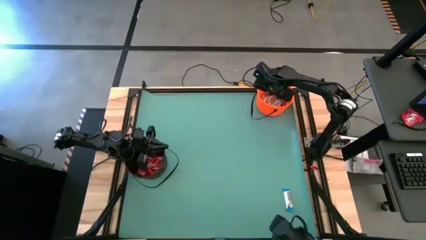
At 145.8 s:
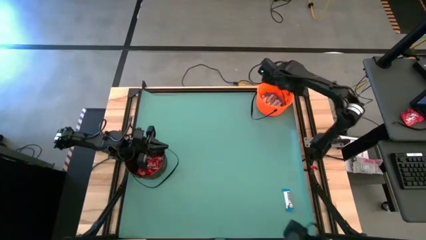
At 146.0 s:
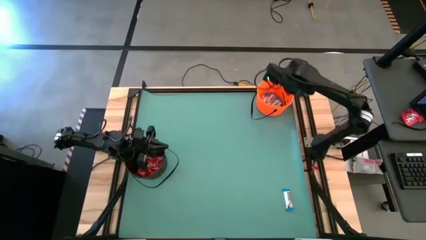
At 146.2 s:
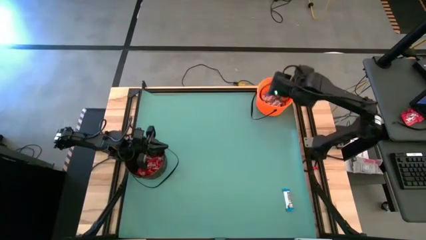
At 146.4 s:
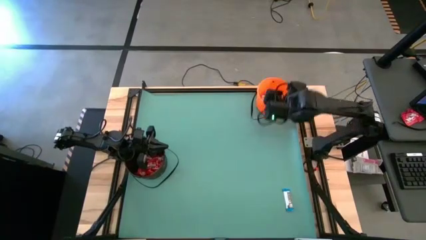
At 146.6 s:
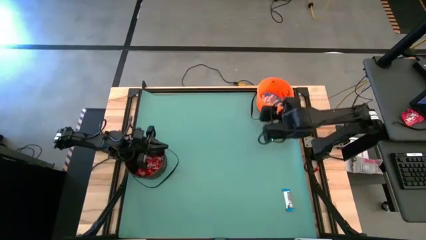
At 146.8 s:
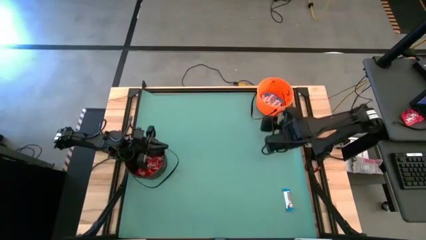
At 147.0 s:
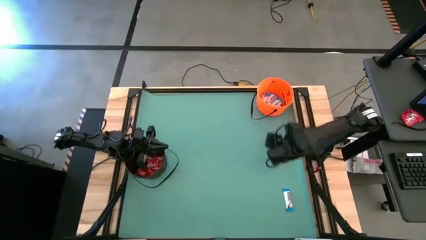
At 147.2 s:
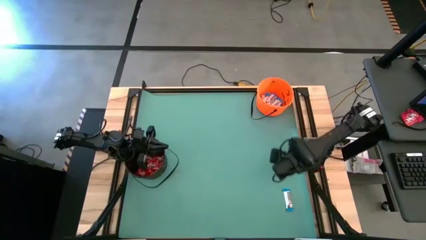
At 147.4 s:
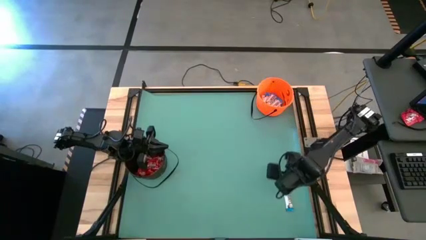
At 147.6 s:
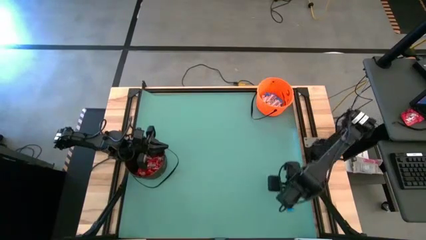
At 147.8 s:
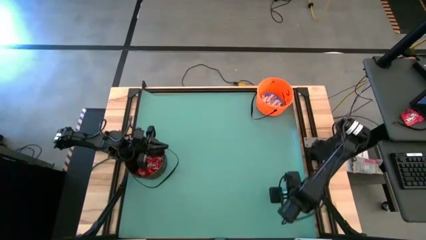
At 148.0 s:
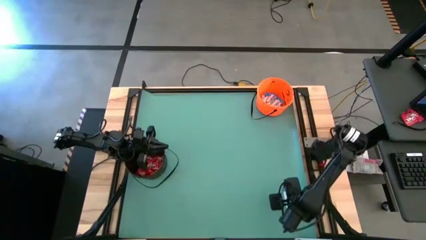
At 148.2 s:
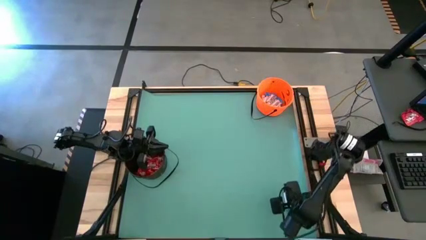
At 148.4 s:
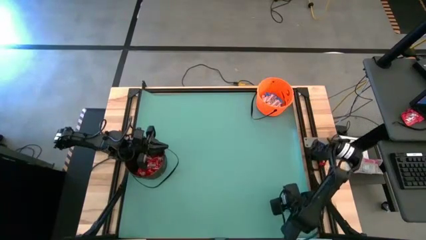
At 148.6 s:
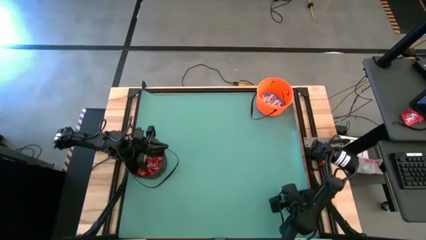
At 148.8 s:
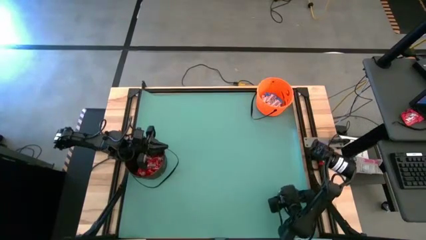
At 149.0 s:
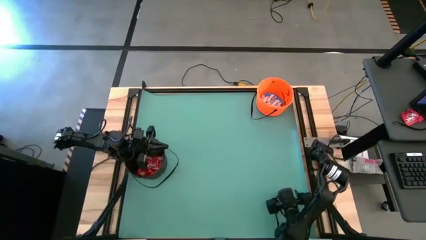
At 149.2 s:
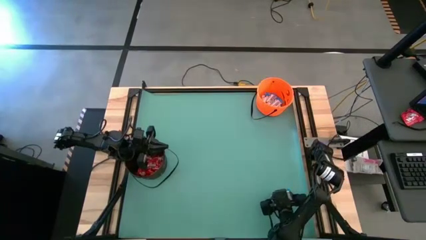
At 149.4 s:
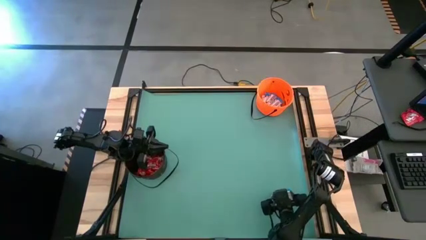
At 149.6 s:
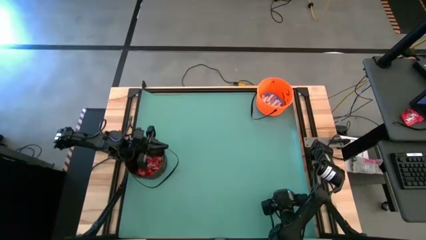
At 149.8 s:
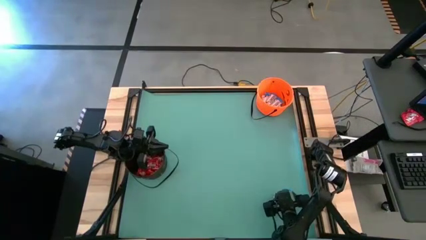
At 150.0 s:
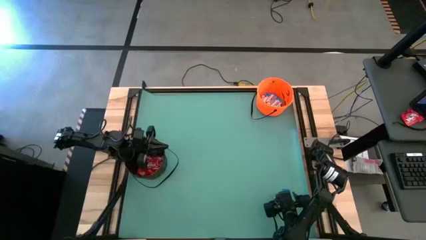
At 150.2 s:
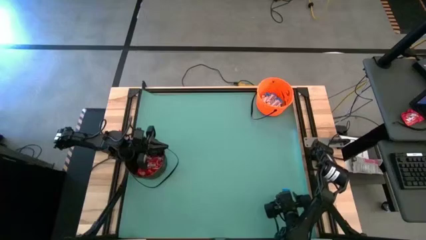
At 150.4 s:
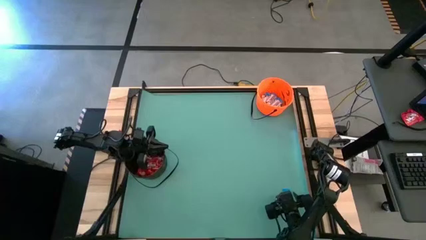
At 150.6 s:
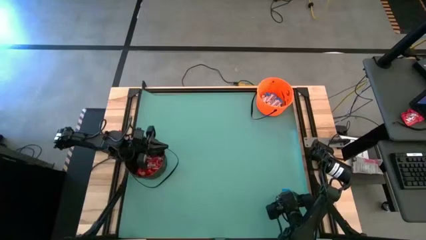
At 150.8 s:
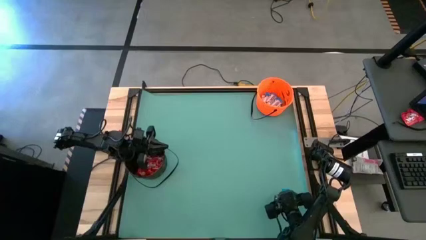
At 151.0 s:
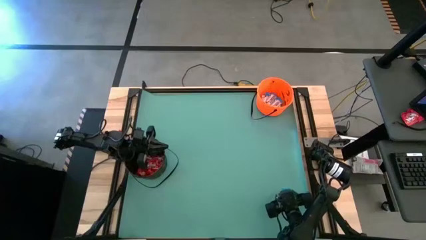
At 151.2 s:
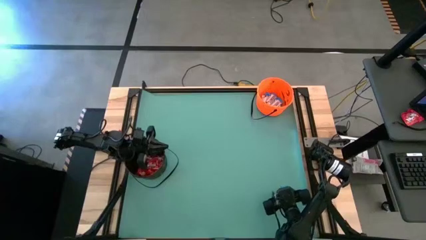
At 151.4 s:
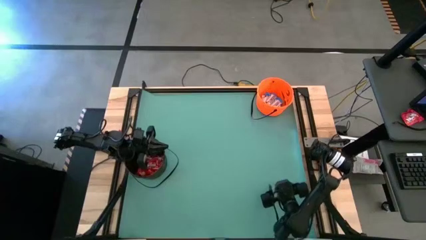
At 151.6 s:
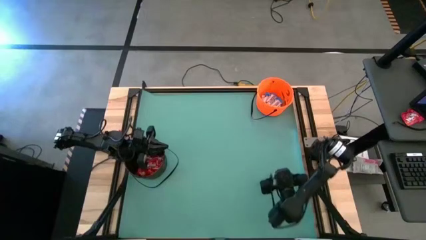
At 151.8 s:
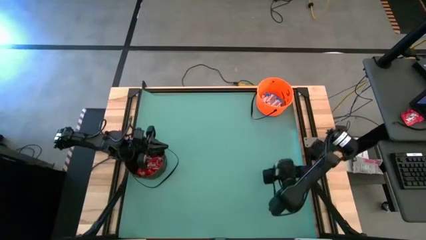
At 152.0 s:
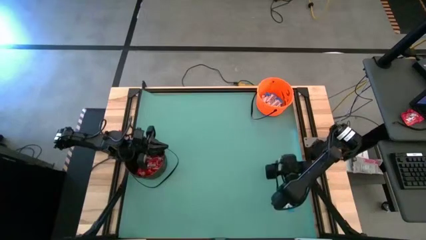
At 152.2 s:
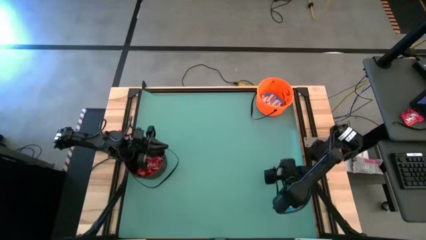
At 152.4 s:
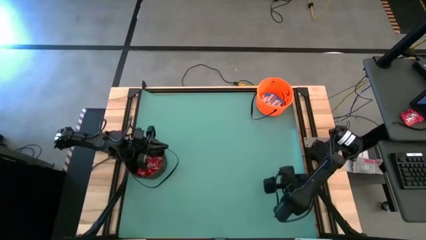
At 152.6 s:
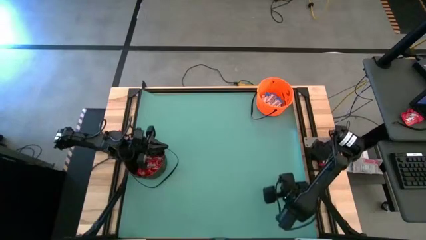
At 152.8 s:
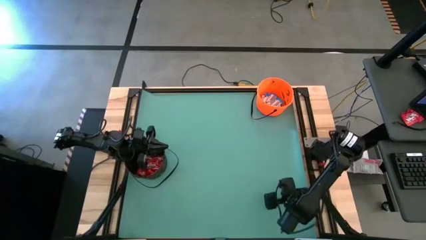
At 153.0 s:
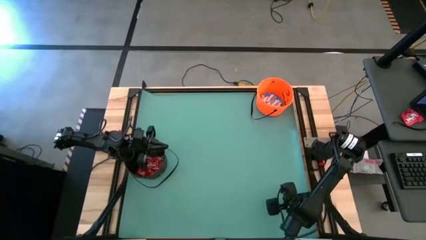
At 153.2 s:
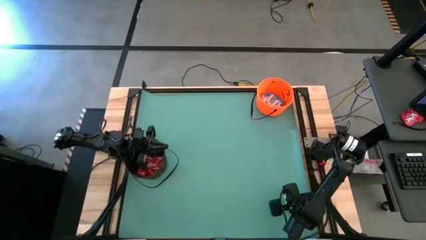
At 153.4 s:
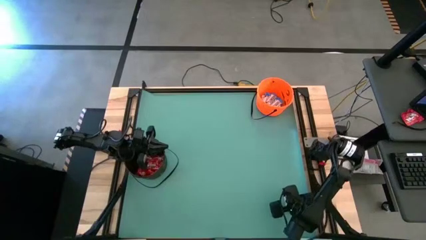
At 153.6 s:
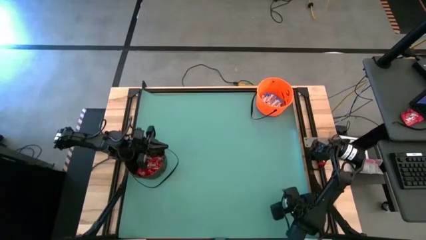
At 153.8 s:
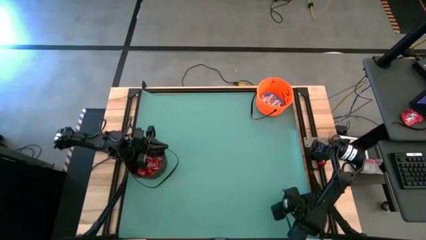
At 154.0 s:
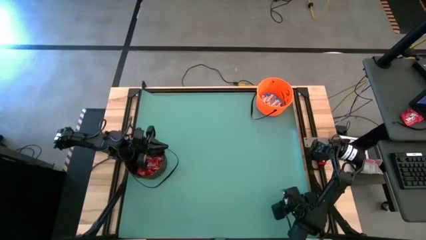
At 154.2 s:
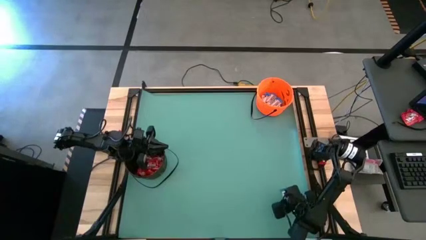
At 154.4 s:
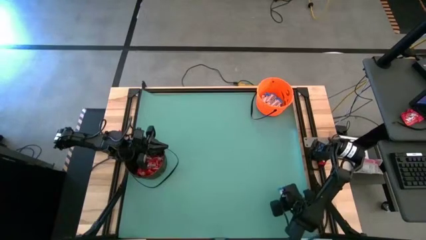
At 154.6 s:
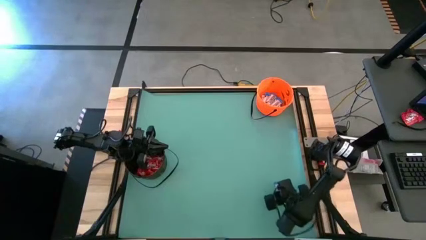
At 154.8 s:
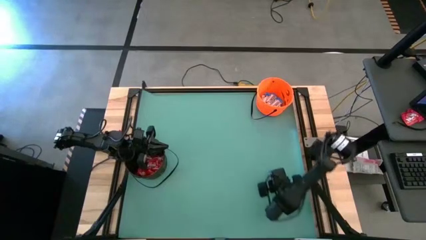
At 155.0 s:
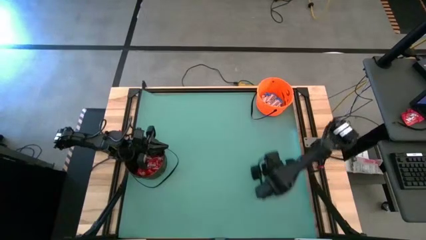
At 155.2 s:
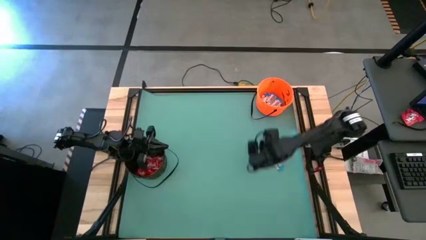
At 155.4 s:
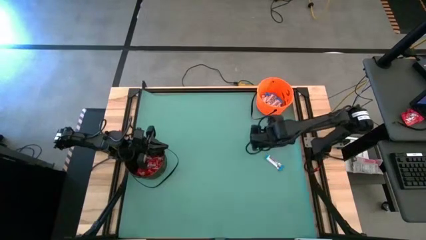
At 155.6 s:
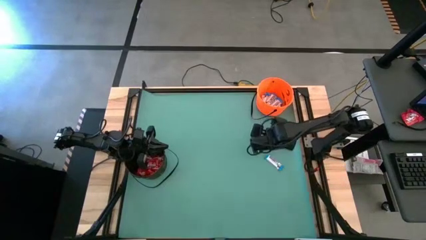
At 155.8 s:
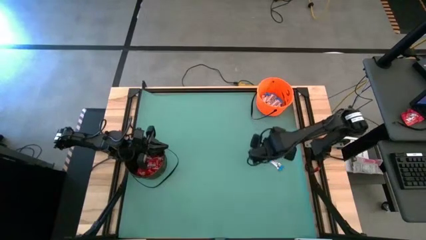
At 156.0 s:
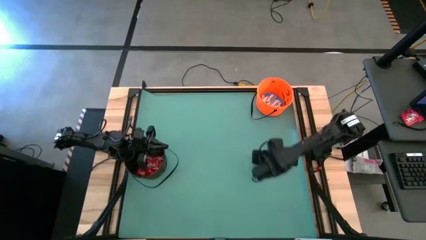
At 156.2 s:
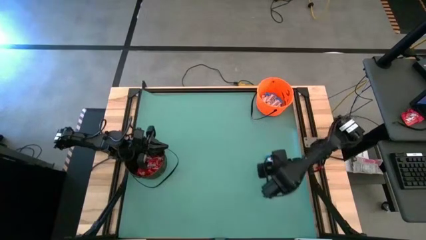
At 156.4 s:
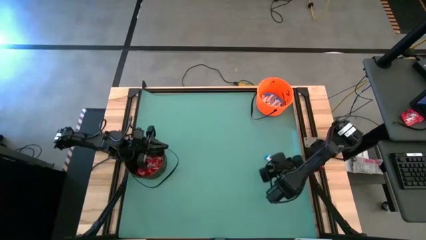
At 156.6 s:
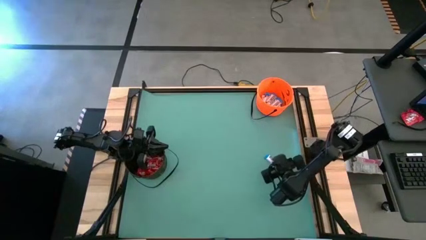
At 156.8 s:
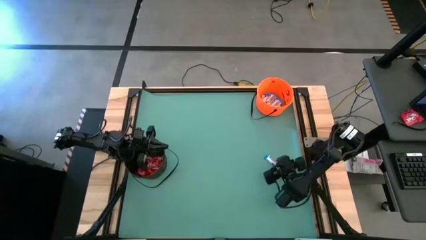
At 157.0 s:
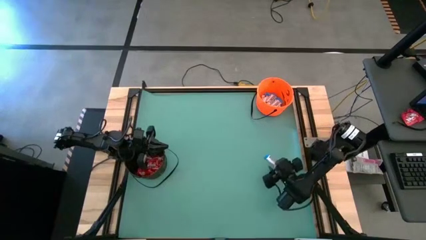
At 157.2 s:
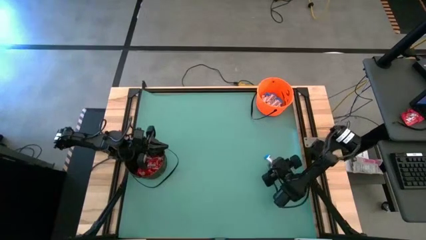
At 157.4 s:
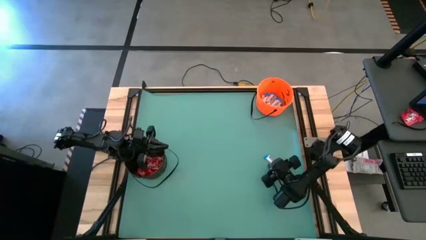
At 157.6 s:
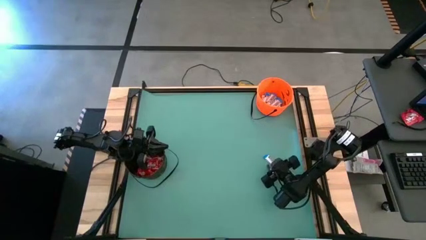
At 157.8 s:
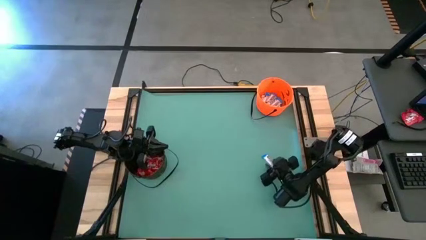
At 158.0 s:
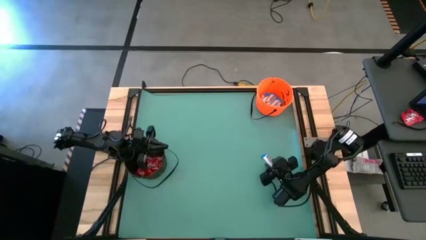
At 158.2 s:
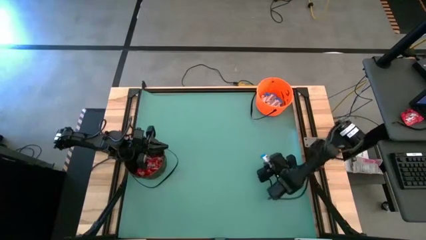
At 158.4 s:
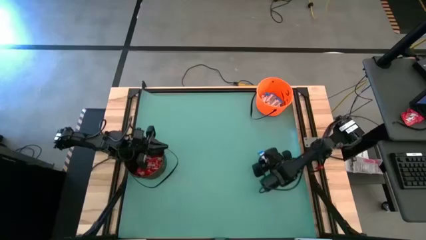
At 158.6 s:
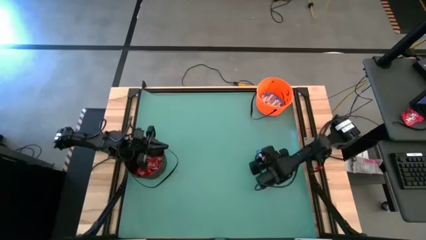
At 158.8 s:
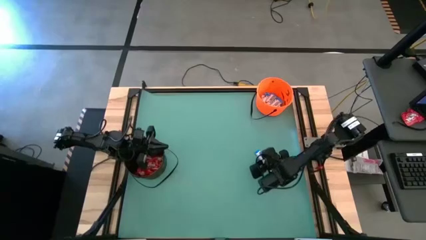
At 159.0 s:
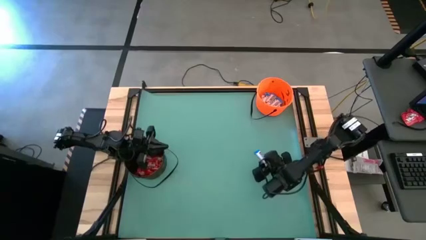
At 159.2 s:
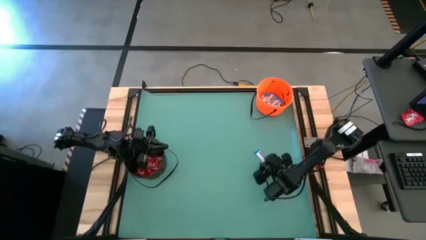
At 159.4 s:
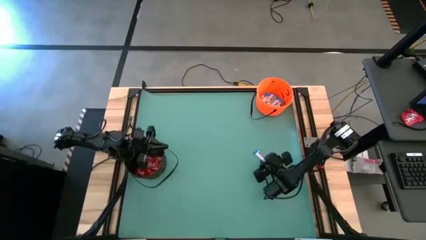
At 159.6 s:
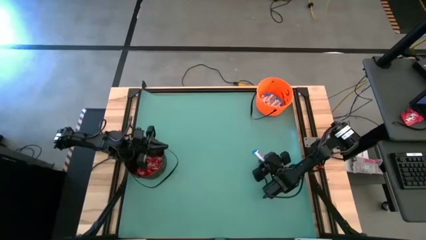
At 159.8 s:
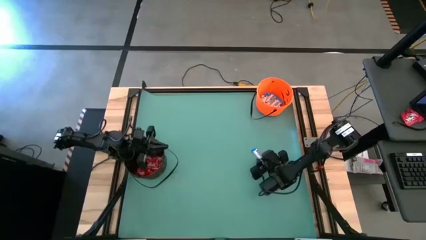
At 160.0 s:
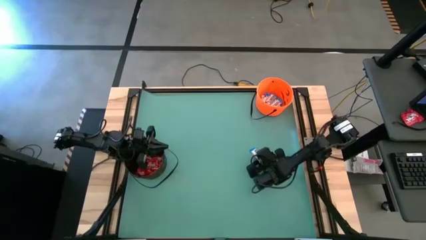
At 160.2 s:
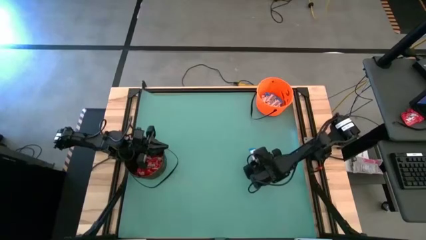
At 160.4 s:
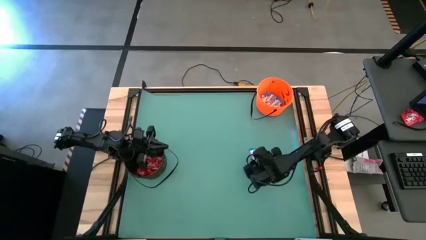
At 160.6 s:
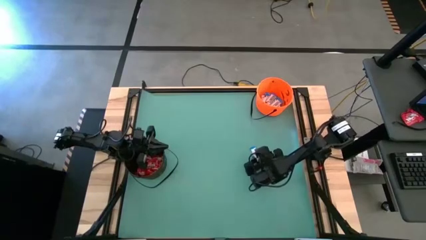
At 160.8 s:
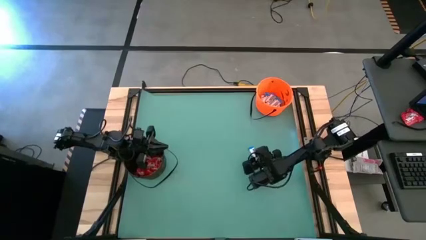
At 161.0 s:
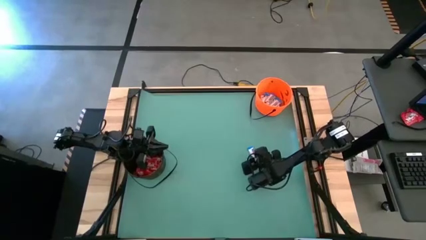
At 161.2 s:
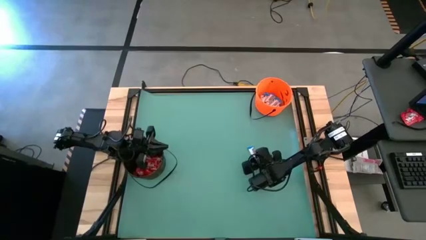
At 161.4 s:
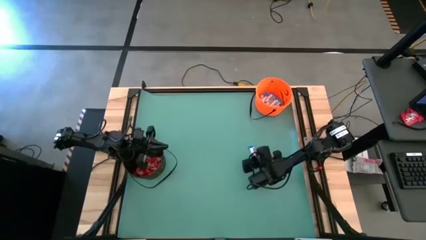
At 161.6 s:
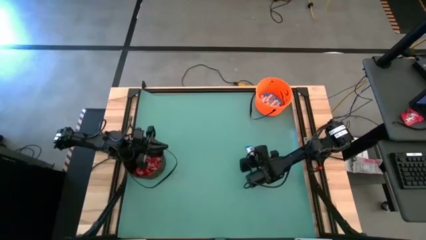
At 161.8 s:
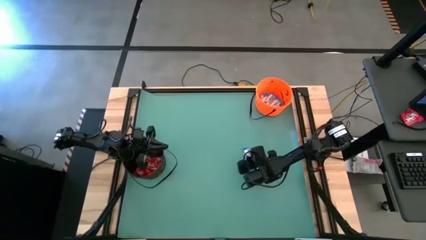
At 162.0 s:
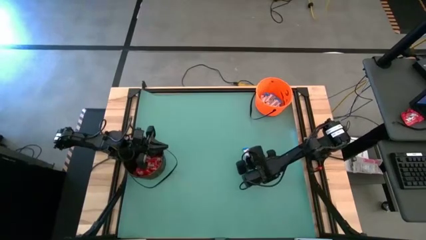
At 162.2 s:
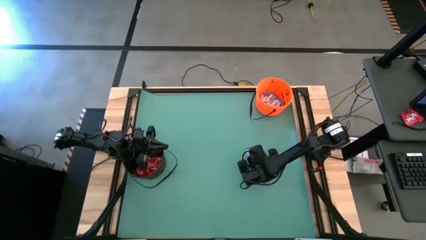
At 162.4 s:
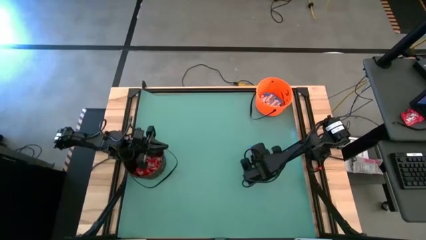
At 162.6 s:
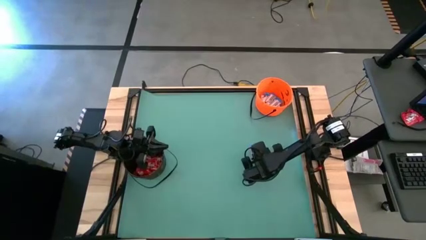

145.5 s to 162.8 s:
Task: Sort candy by brand, put in halloween buckets
Put the white chocolate into the orange bucket
